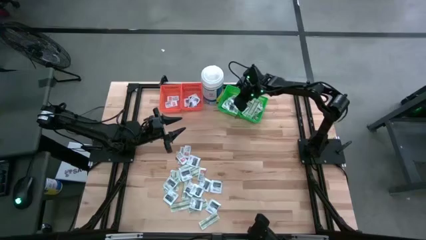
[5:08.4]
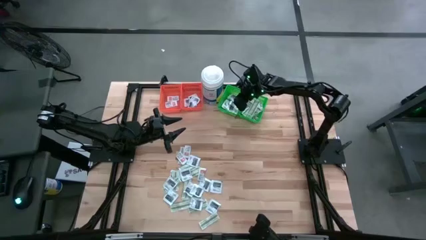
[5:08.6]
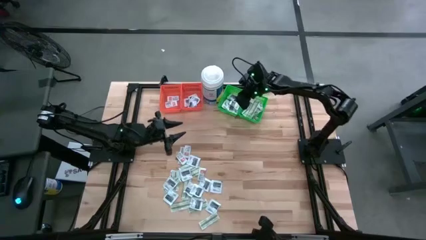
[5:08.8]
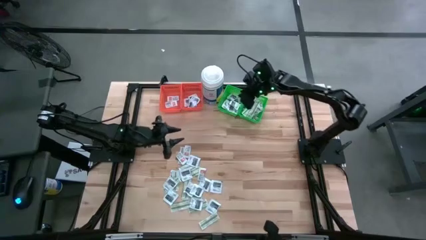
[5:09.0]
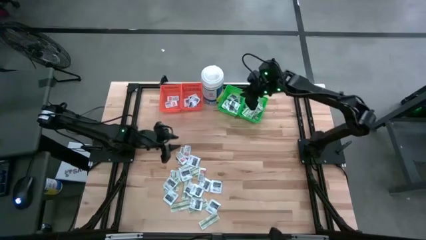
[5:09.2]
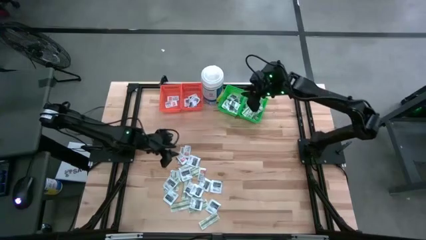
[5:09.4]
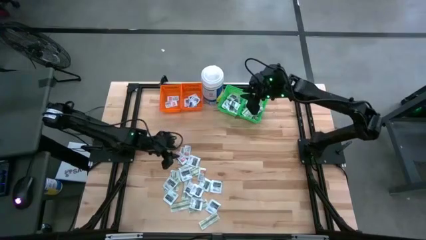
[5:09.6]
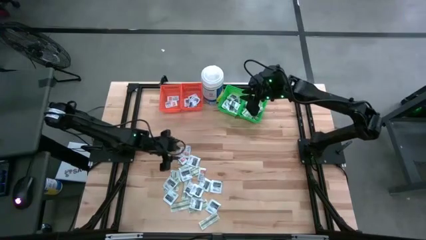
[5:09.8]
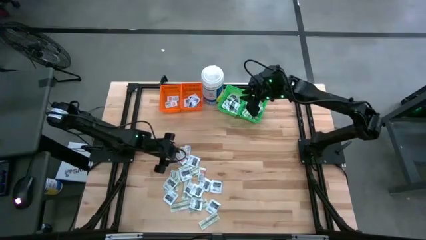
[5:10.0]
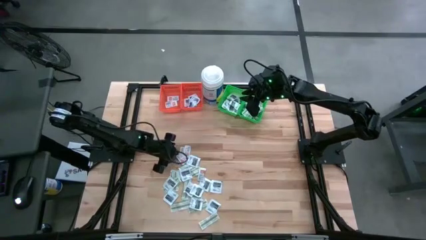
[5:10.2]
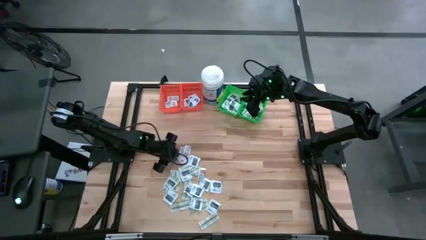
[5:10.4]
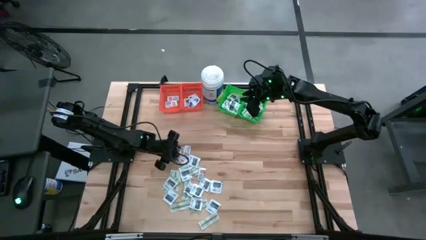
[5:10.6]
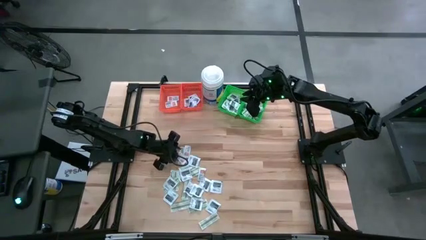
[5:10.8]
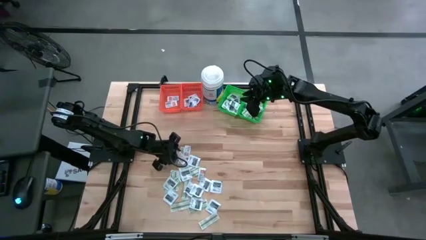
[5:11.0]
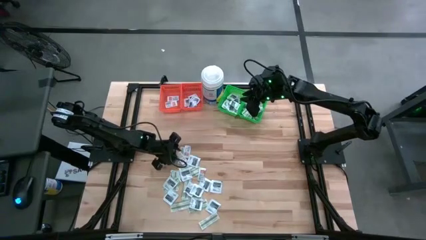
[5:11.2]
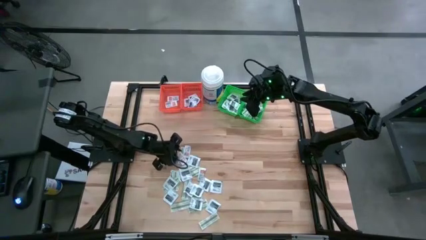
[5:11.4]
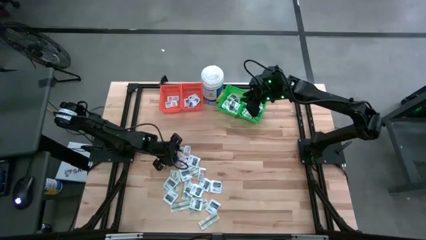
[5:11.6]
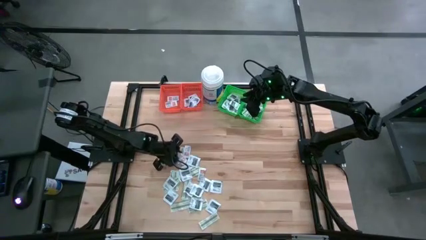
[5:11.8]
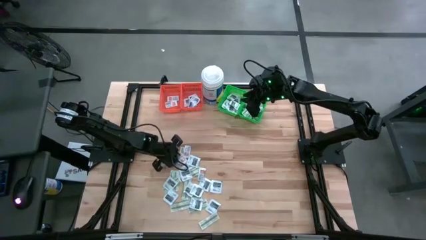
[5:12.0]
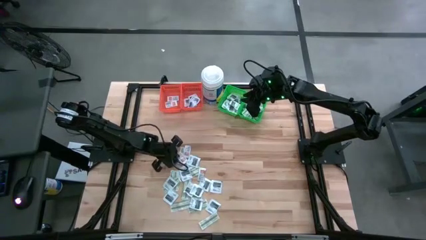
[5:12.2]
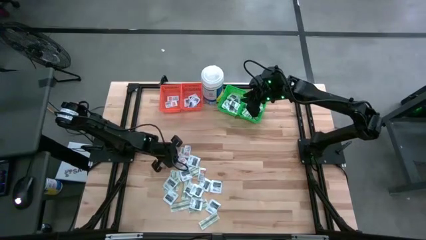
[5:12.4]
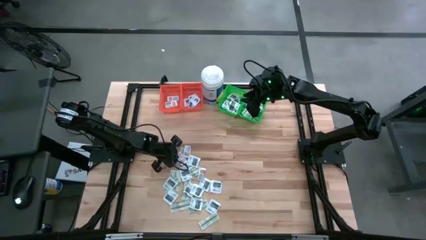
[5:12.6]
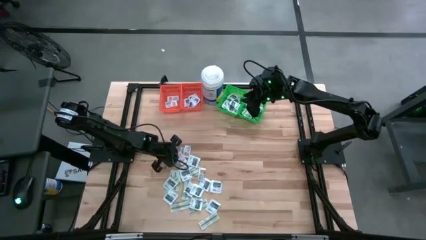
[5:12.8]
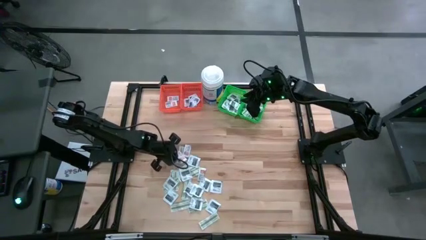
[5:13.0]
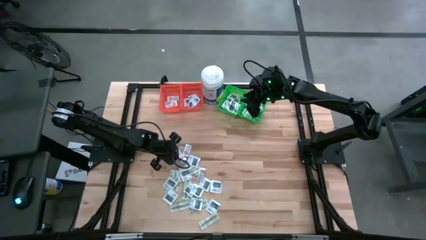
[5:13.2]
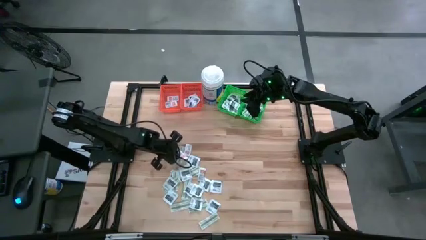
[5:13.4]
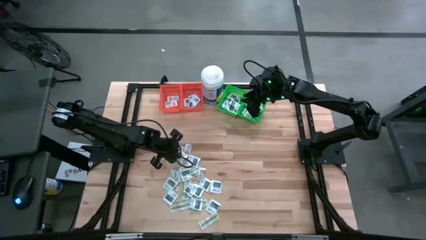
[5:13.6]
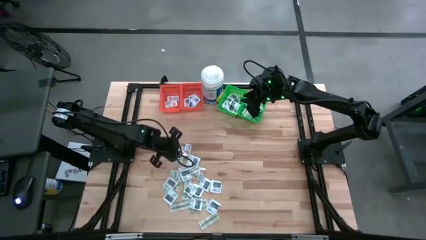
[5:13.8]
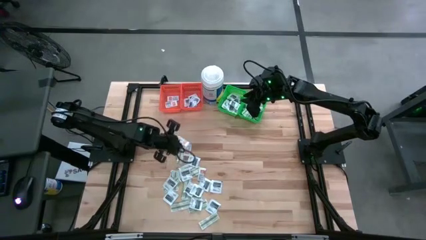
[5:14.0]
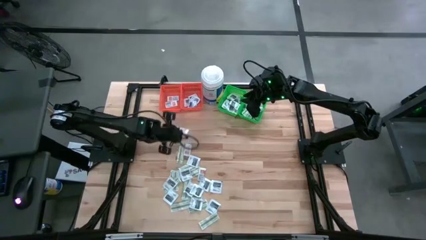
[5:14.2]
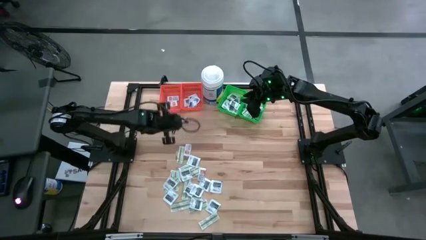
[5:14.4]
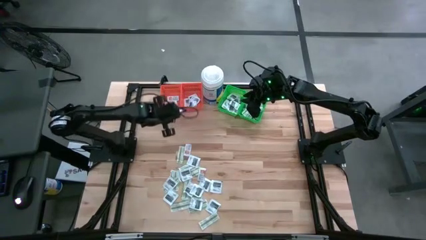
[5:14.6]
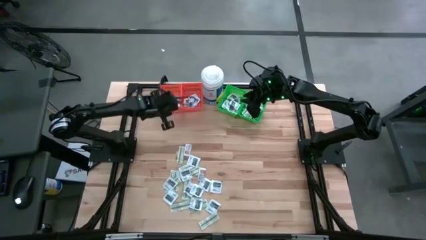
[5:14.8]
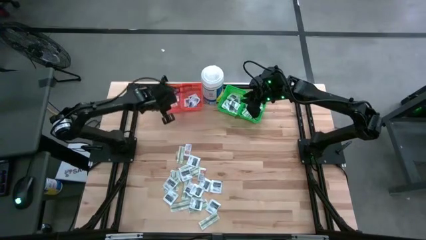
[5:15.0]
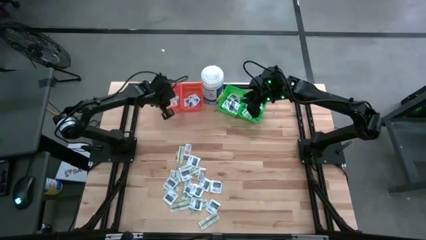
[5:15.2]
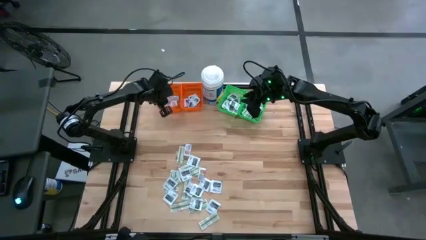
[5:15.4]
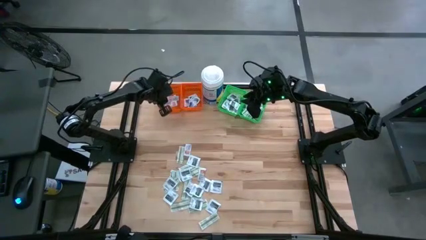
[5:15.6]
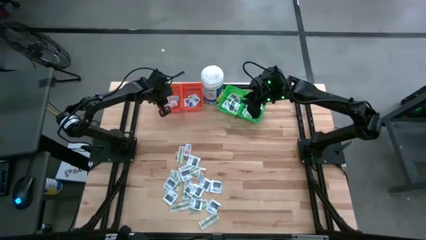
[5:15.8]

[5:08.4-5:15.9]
Task: Pick & Place First Aid Supplies
Put the orange ointment pack into the left orange bin

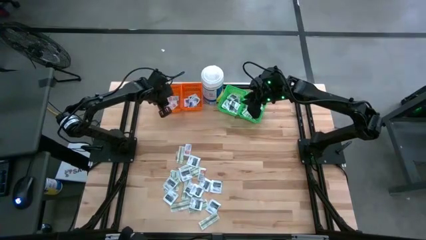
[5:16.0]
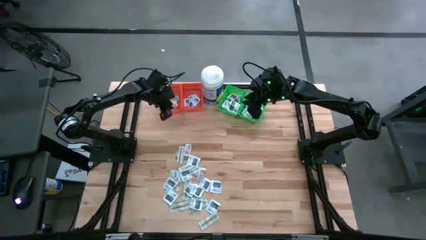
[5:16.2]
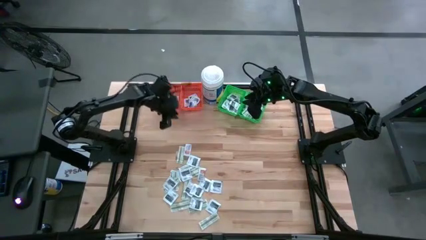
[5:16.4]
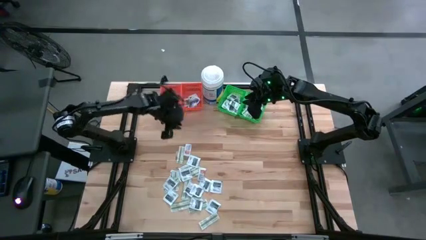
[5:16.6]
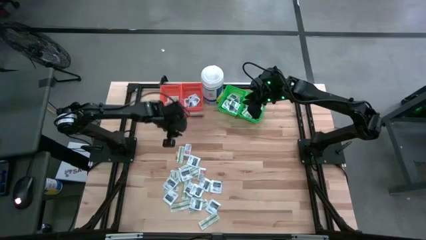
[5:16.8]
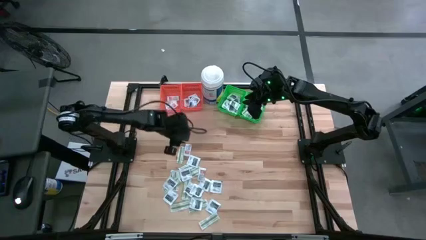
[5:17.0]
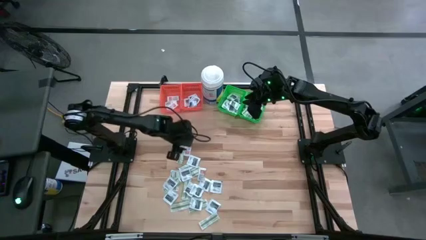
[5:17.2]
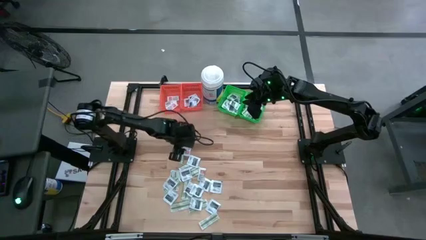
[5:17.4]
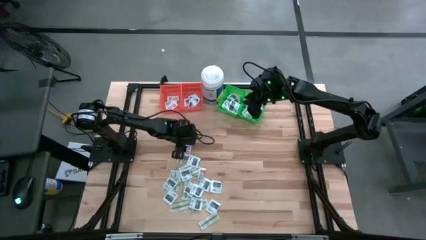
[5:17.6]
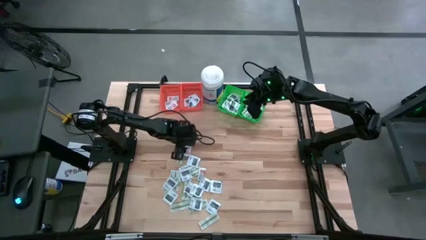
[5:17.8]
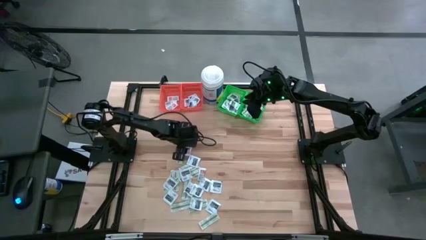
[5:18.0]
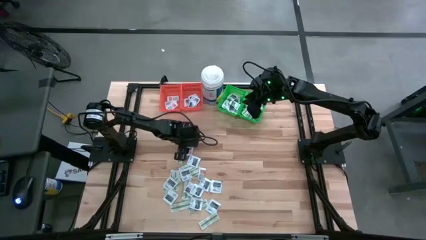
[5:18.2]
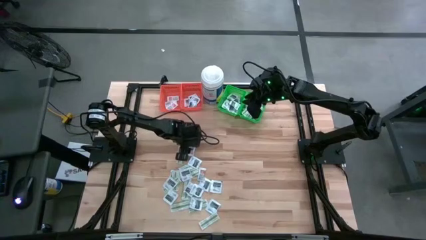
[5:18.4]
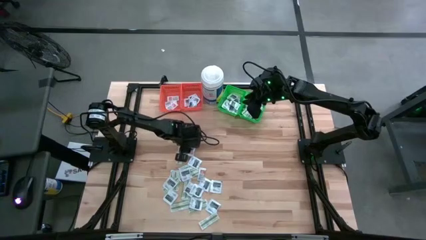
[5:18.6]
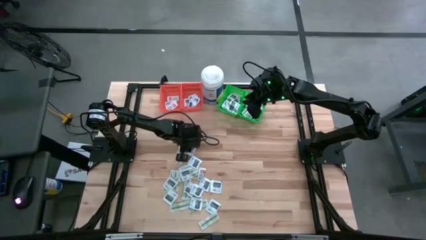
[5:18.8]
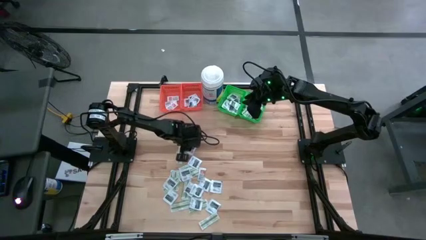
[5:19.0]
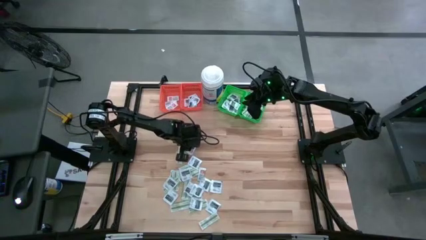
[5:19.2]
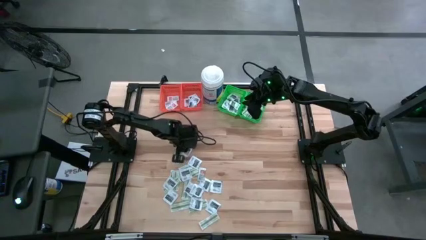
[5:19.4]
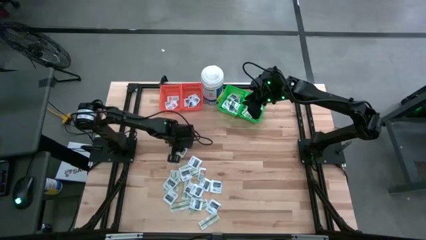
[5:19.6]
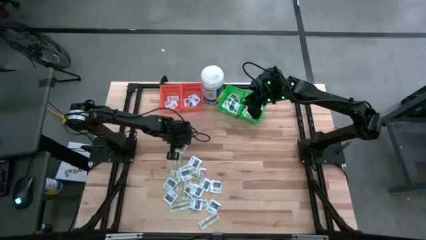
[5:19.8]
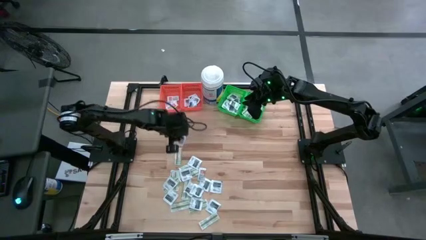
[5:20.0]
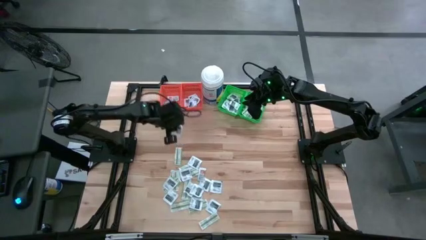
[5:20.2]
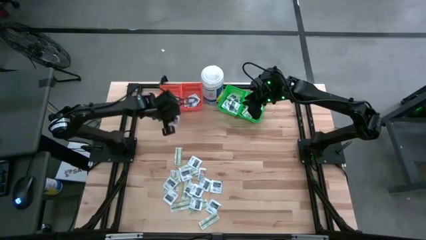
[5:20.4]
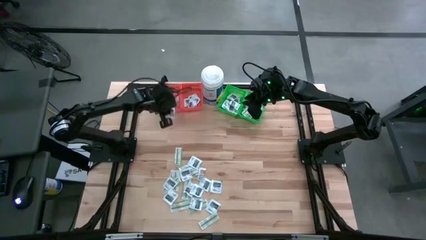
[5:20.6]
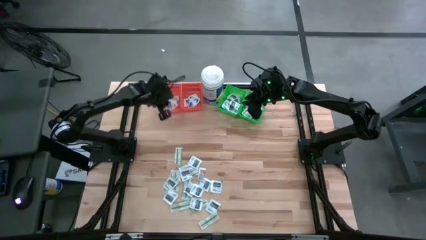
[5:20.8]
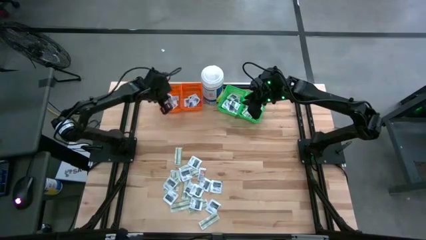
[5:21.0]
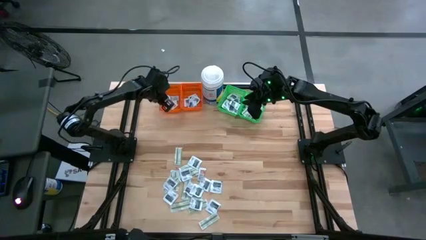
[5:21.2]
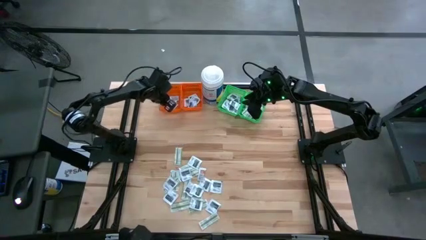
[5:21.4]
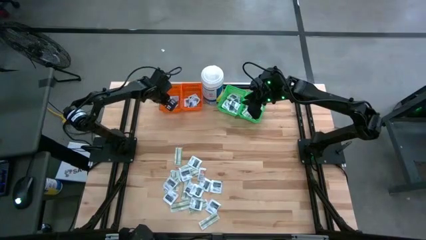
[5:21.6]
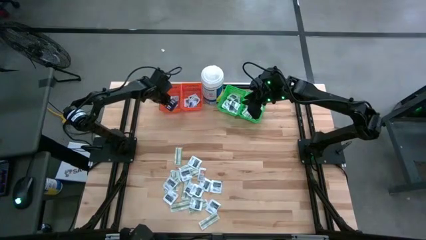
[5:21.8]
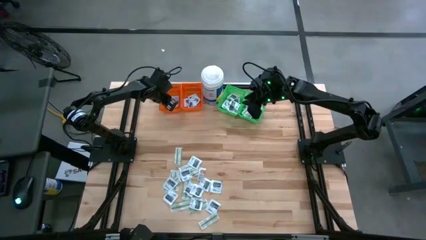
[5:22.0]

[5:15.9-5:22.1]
Put the orange ointment pack into the left orange bin
